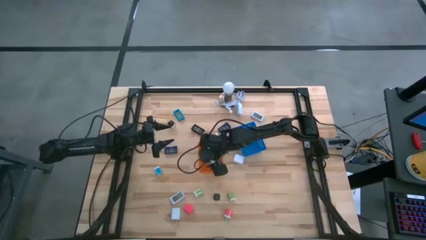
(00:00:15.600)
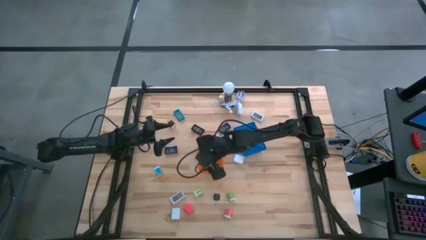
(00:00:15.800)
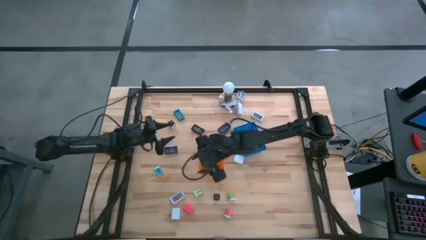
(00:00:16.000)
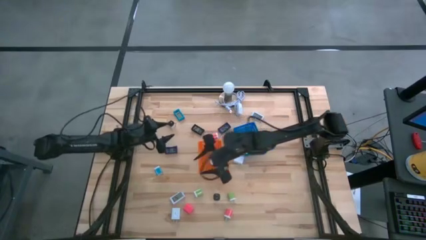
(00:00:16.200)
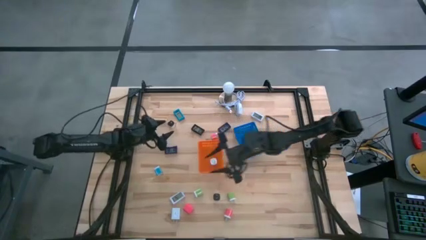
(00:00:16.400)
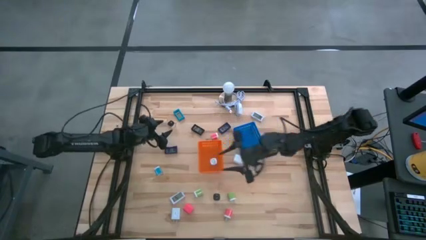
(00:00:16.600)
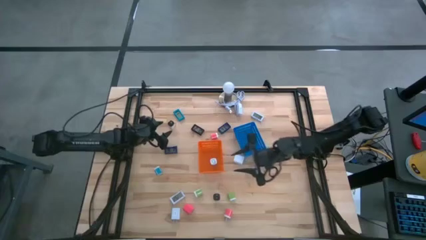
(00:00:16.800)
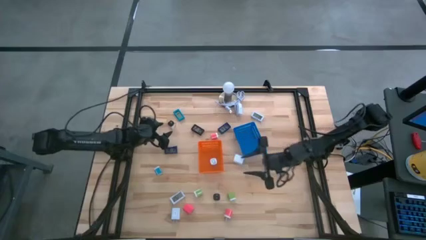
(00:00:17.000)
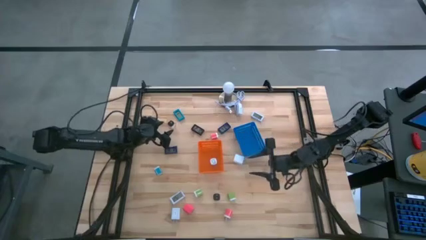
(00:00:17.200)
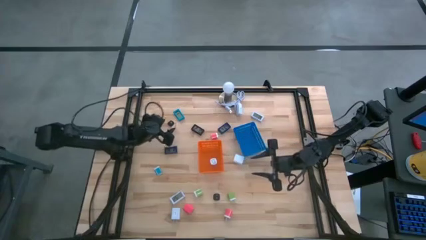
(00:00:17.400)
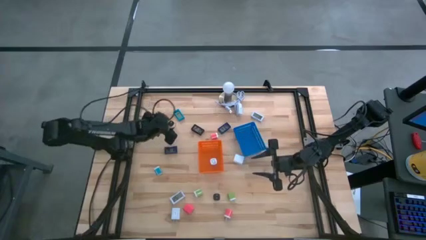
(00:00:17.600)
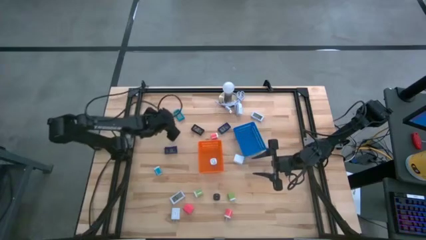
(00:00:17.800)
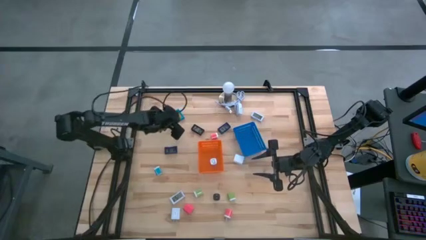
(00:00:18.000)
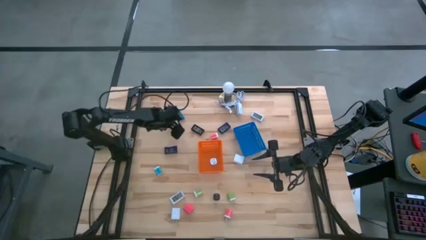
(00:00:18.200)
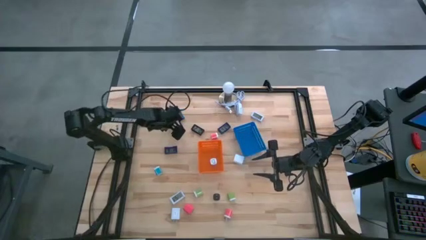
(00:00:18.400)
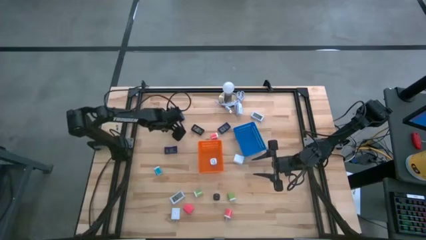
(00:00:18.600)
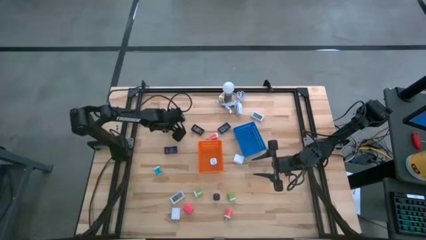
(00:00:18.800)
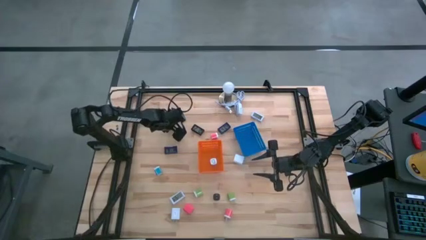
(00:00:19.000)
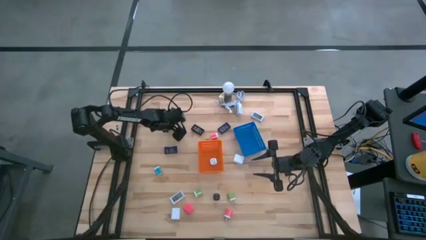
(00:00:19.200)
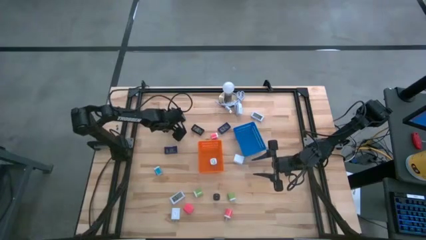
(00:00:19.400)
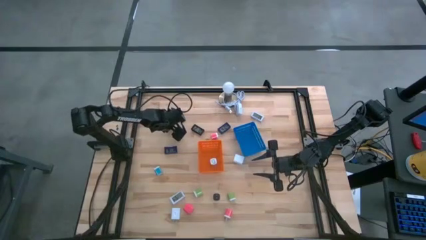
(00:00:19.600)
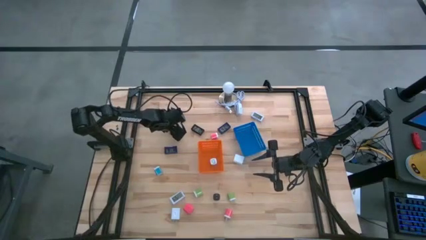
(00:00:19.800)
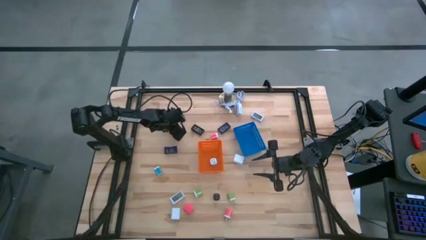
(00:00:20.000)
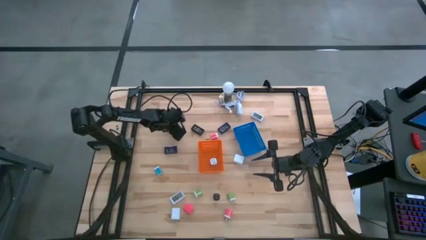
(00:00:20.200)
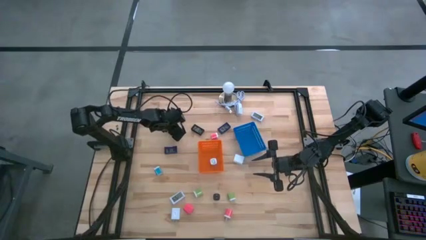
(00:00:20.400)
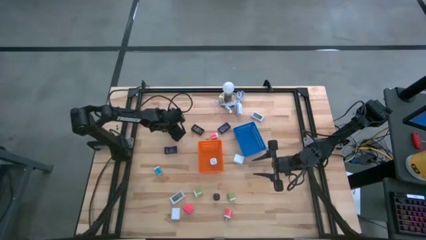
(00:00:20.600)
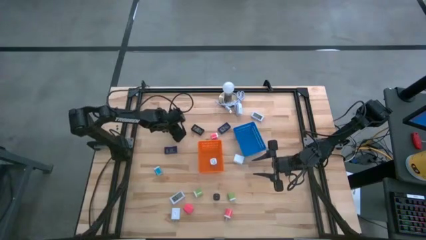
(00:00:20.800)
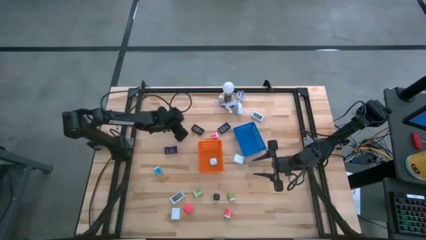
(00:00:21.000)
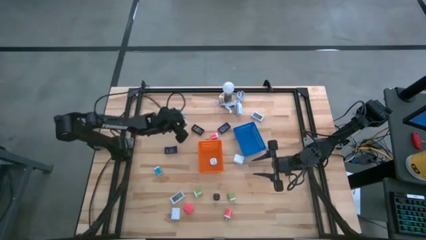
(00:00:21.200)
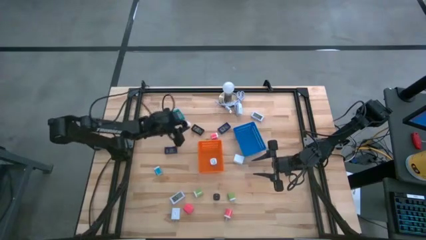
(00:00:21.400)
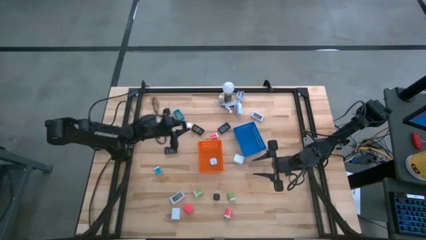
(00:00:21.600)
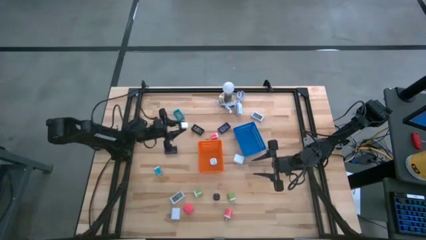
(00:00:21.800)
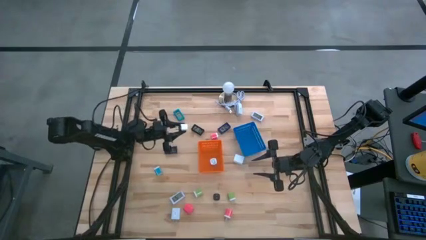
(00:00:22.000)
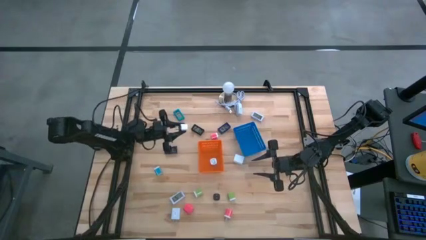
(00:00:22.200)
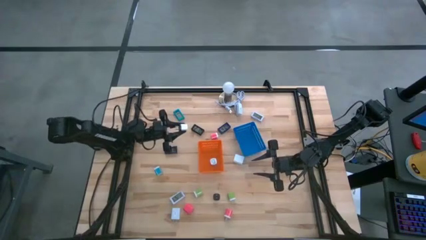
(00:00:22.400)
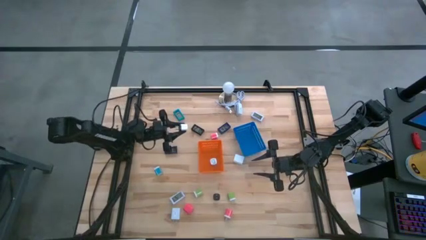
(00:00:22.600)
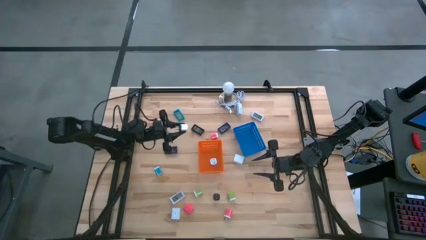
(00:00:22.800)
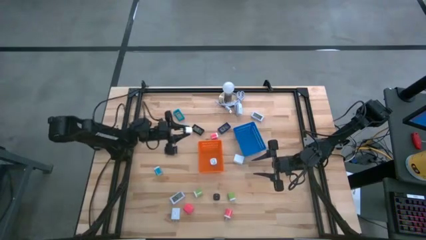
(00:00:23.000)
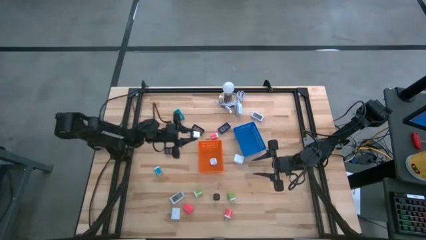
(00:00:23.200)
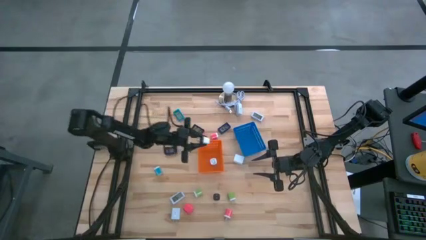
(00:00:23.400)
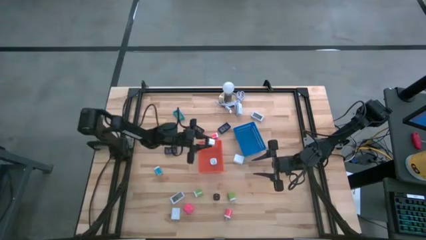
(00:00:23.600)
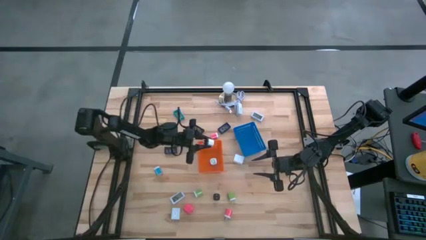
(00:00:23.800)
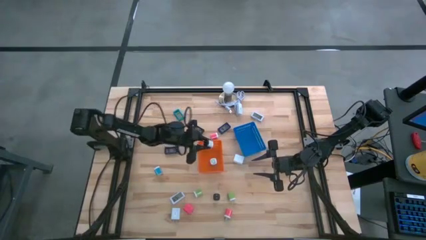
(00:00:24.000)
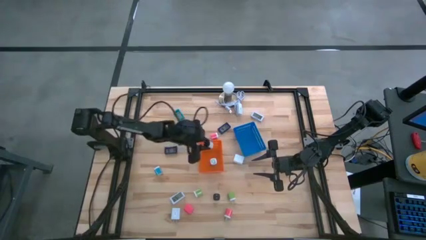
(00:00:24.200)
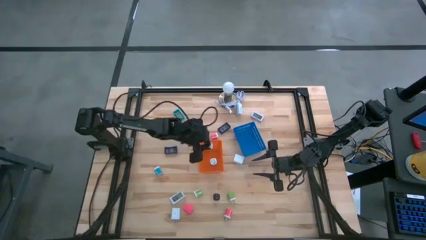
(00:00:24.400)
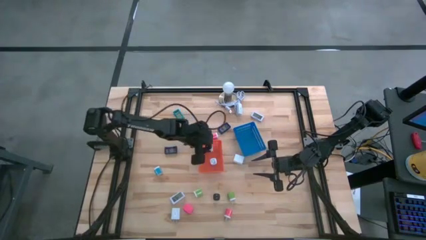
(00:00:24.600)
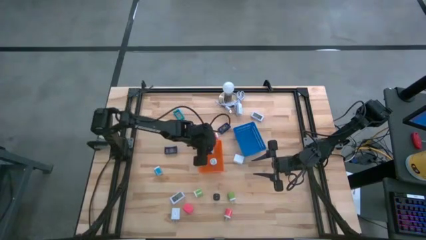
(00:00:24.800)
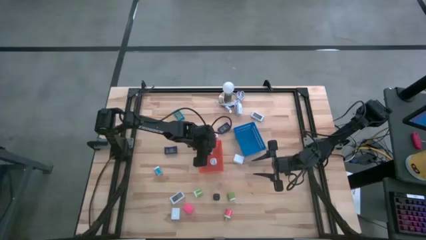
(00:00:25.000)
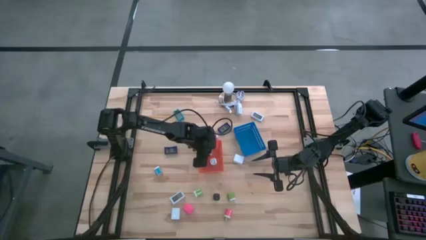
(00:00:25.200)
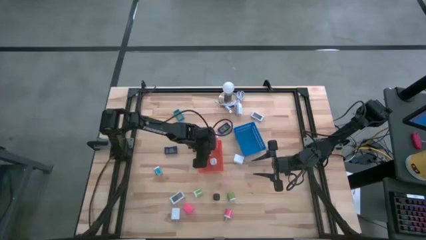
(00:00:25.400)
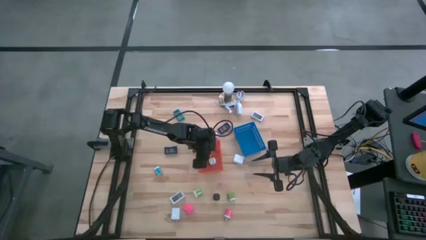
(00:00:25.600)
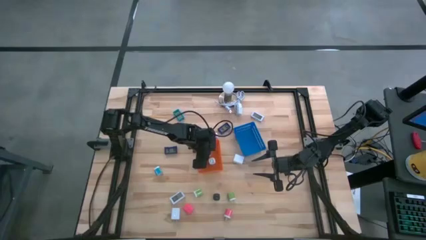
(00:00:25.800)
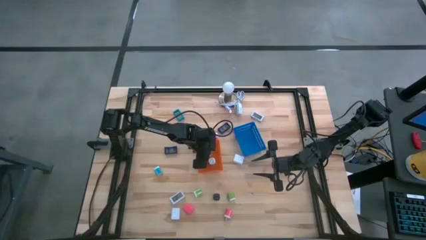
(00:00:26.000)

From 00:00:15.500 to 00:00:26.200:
Task: Pick & Place Office items
Put the top black charger adapter into the orange bin

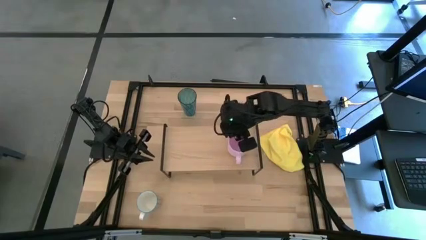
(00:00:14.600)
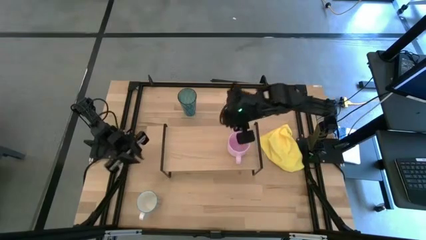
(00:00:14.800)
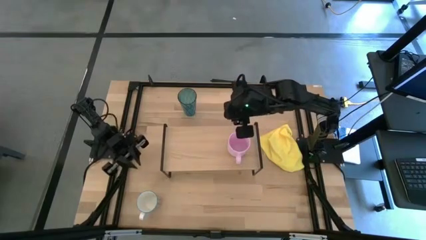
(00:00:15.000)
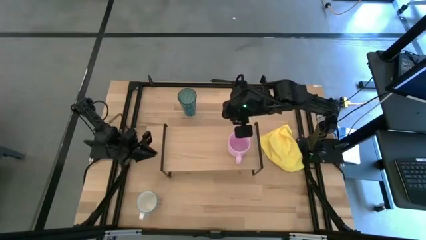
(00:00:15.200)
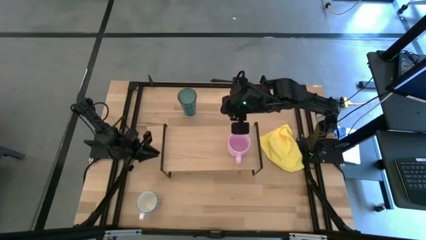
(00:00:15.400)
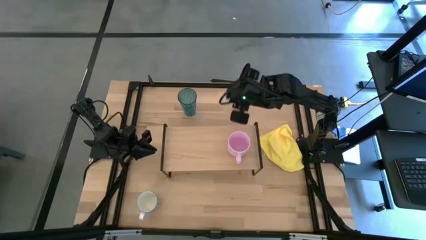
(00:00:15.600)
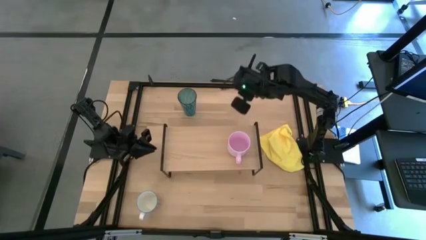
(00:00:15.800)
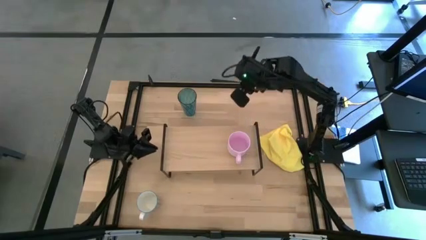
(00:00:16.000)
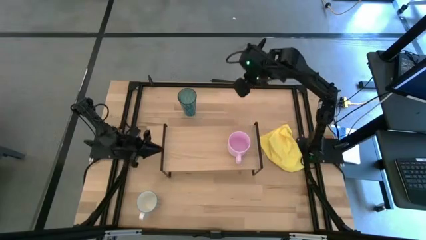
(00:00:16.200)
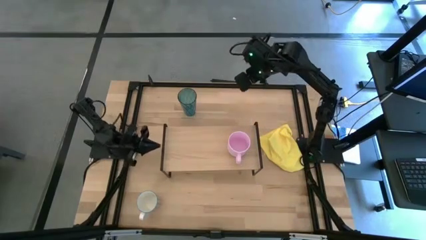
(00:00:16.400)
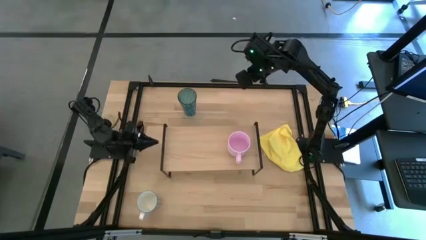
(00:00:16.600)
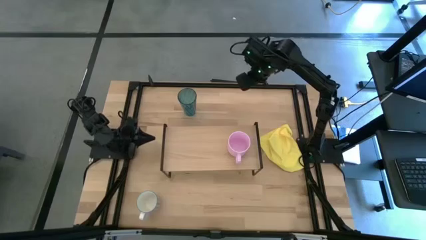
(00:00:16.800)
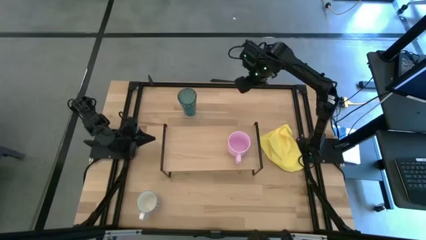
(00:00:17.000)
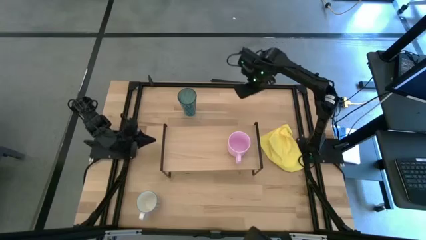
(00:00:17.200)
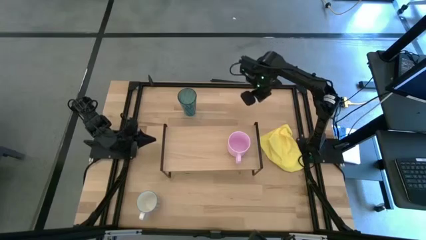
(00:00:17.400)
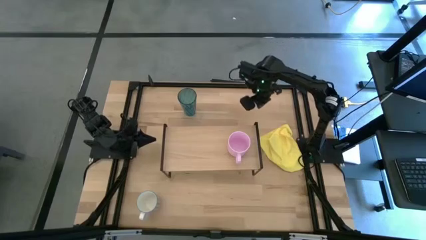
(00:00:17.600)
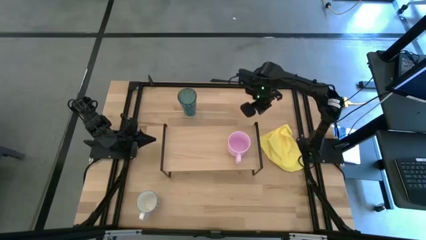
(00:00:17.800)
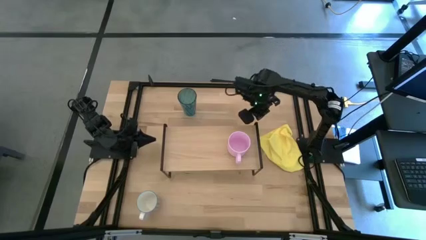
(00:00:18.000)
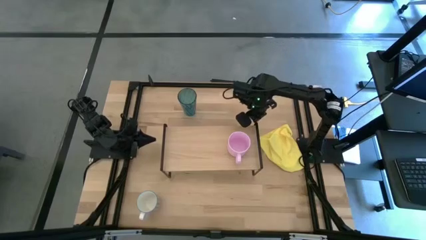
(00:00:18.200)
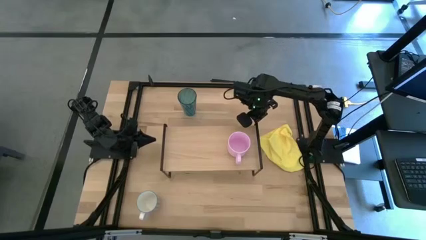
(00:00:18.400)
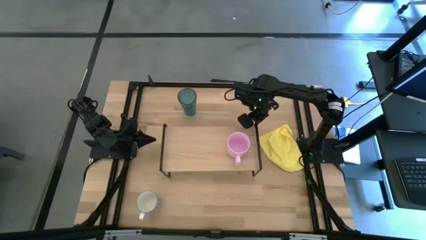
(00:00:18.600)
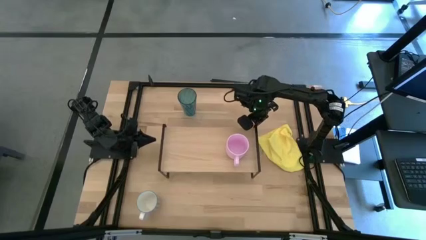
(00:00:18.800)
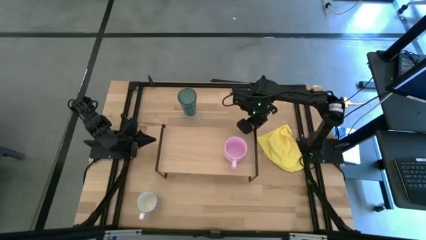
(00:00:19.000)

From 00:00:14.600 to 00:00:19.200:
Task: Stack small to large cups/mugs on shelf
Adjust the shelf
